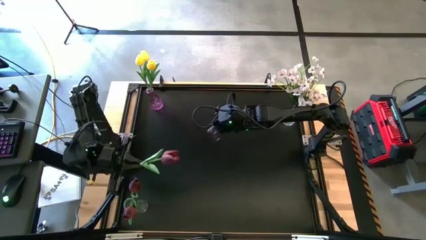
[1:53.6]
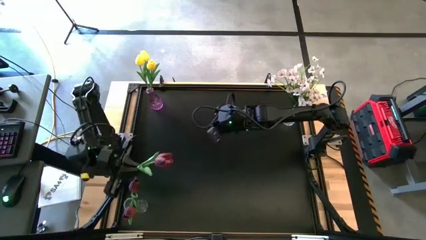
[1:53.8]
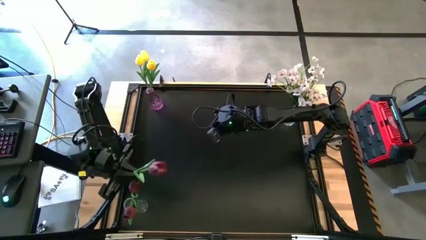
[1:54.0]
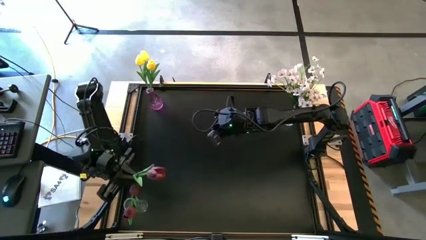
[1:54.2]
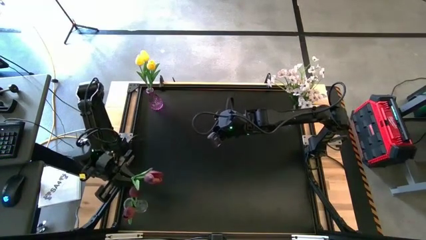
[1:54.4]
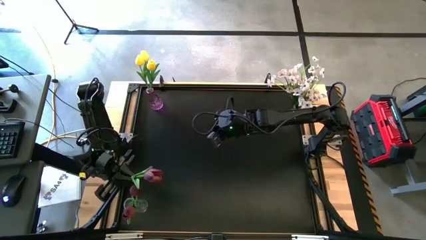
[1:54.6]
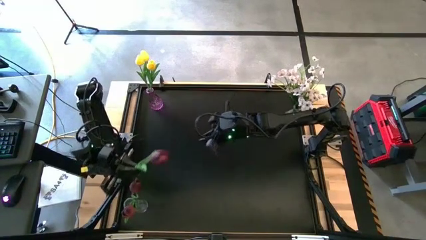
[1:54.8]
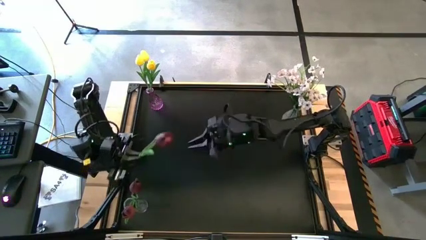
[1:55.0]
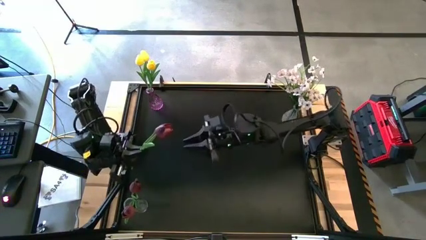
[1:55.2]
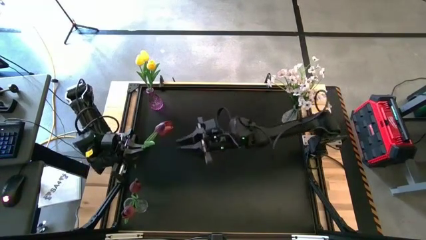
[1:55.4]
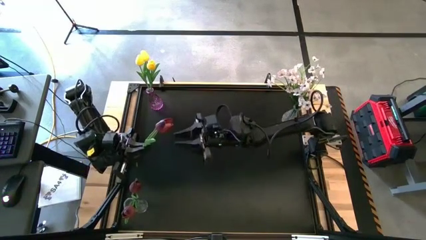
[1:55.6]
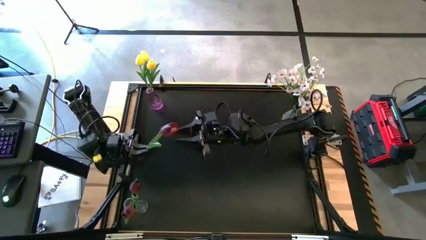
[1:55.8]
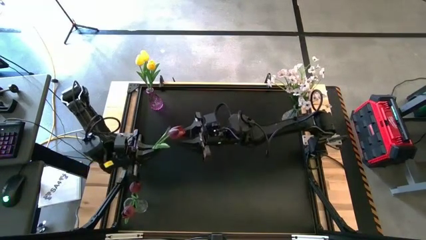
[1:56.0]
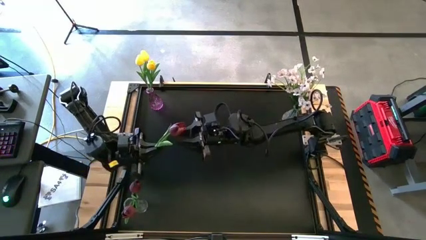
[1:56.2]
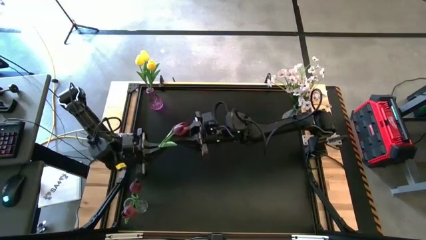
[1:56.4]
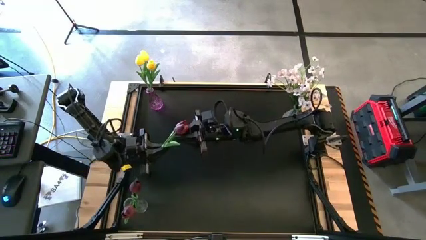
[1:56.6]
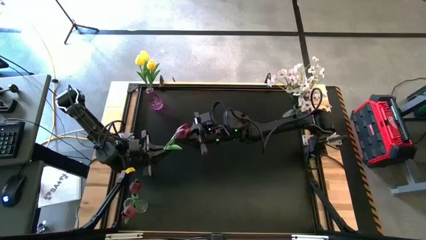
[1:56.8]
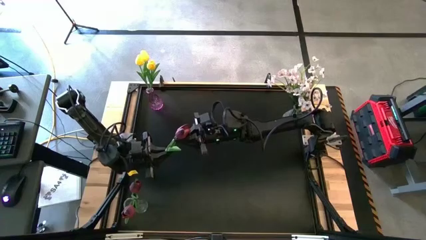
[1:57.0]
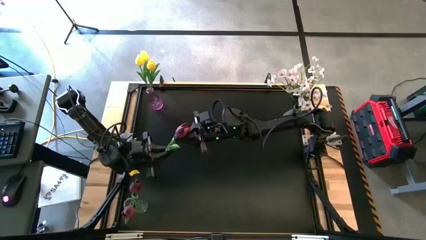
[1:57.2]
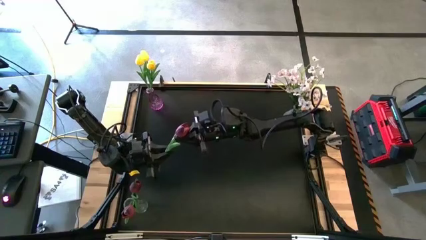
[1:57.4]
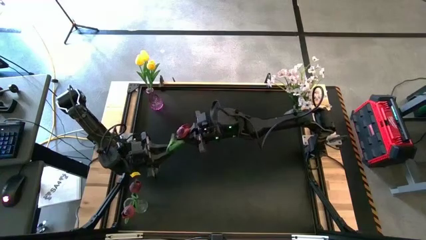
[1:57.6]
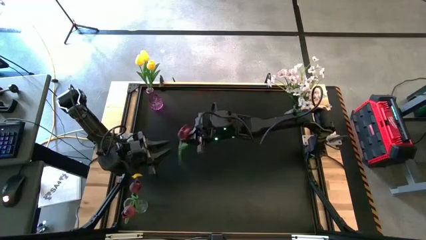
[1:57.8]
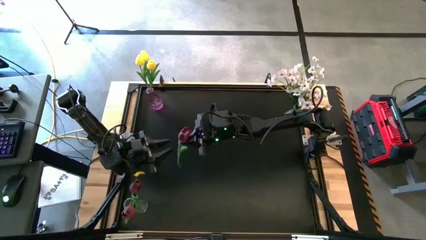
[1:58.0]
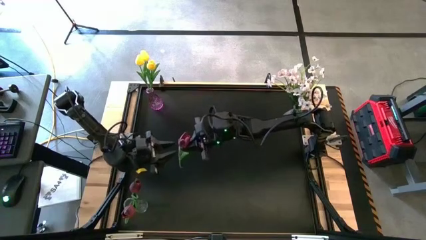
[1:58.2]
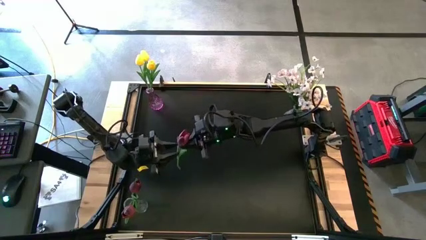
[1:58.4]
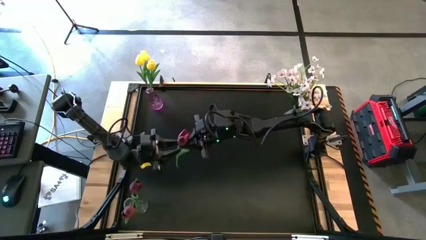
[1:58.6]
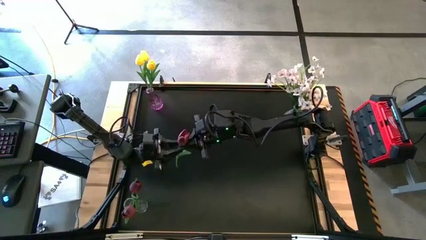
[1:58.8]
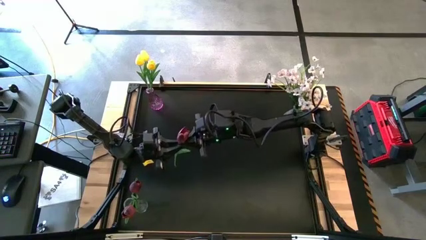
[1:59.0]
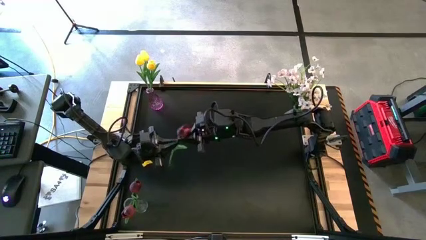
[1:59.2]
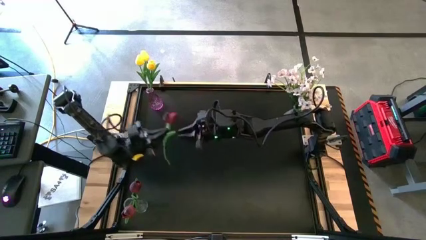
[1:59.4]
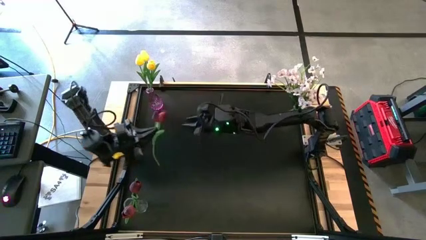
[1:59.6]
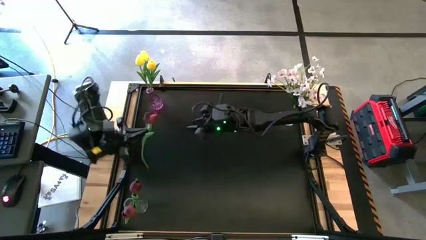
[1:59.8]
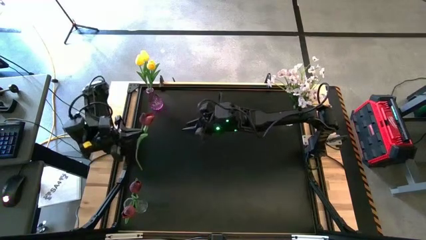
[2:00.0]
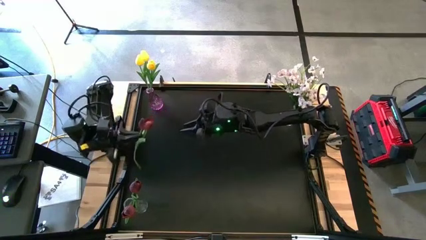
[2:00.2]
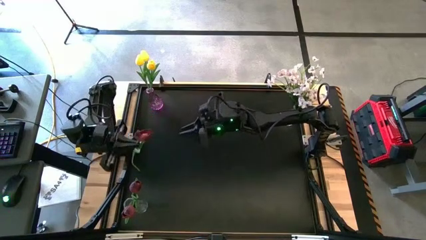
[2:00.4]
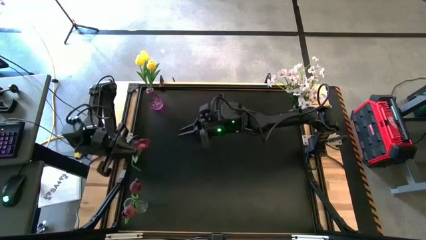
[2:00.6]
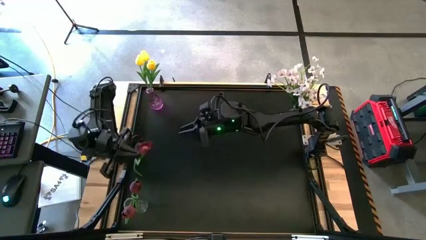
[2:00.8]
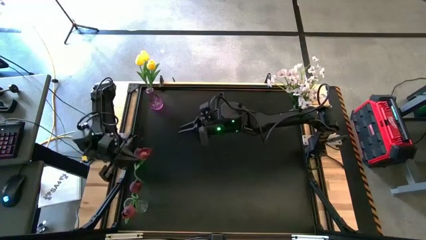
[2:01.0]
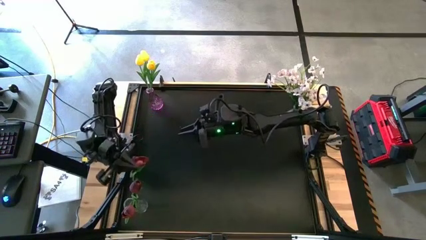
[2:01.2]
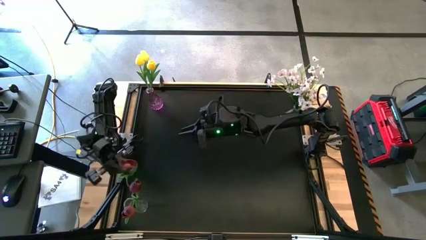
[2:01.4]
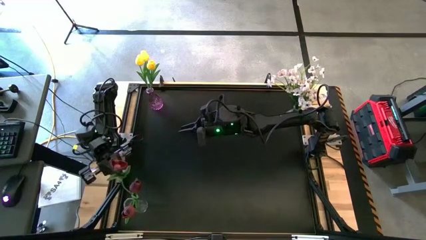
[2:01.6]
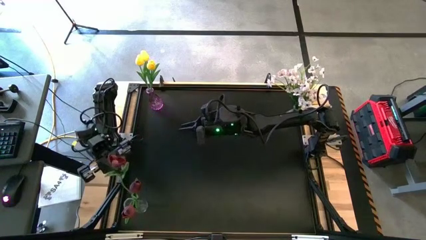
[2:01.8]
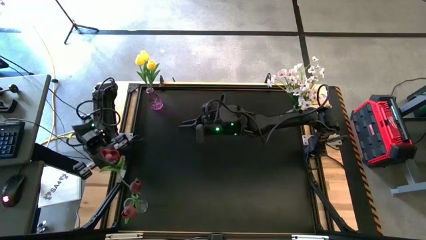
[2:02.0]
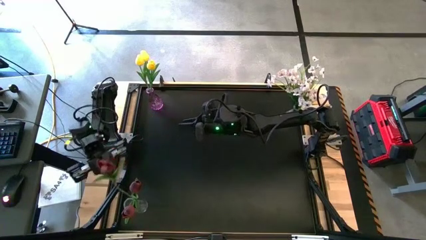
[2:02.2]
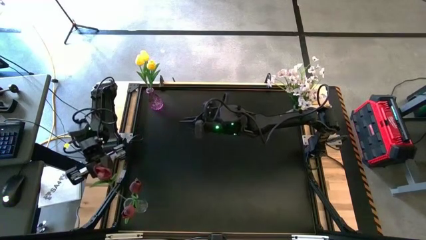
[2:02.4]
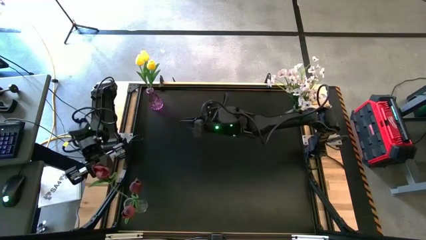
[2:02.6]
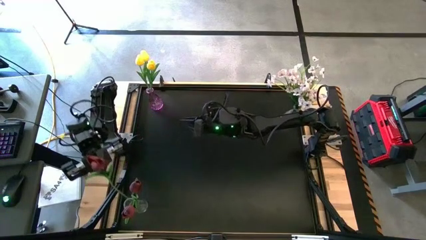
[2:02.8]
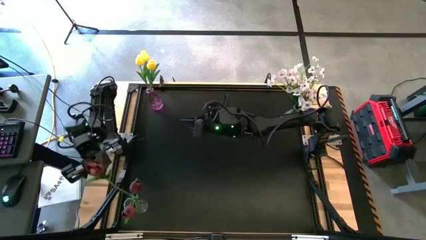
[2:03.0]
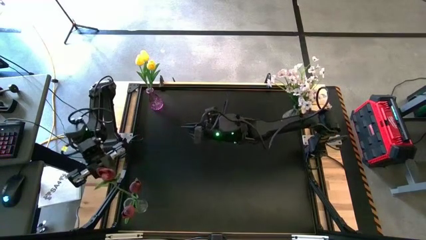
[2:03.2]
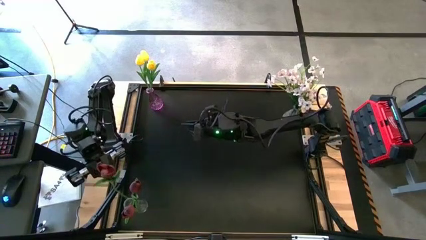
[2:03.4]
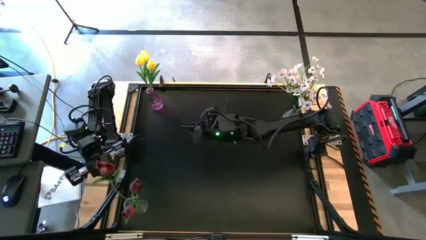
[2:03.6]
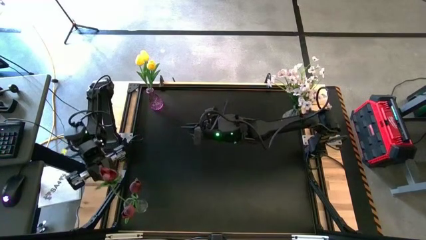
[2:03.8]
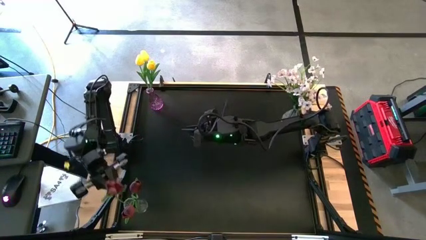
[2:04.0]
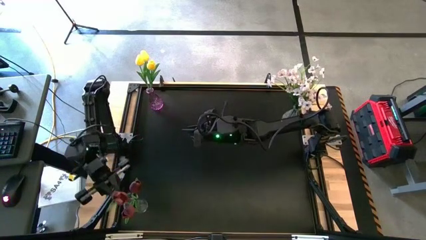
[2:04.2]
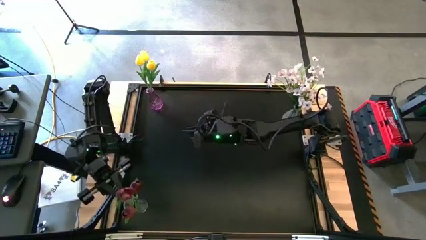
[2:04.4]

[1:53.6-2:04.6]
Task: Sort flowers into vase by color
Put the red flower into the bottom transparent vase

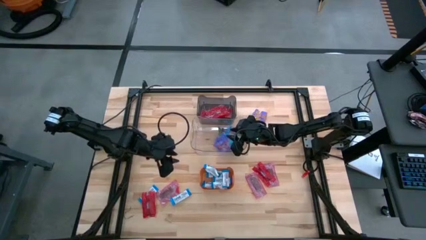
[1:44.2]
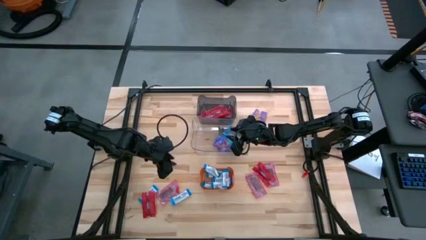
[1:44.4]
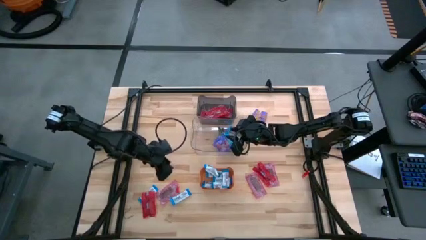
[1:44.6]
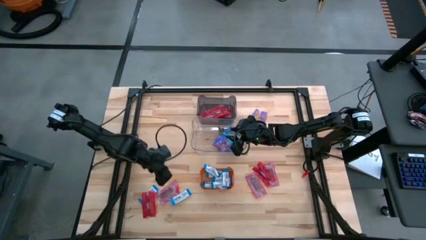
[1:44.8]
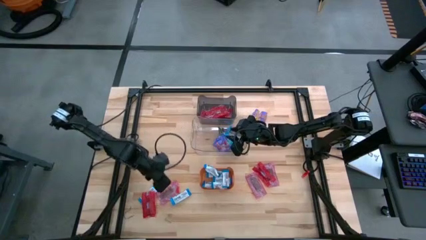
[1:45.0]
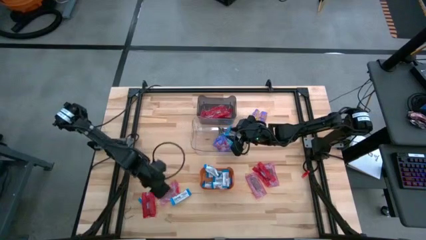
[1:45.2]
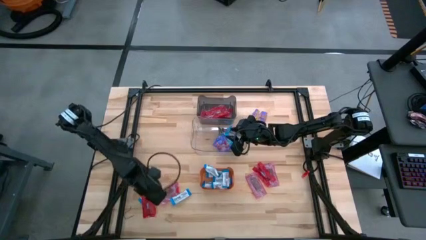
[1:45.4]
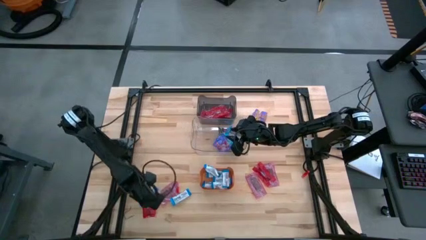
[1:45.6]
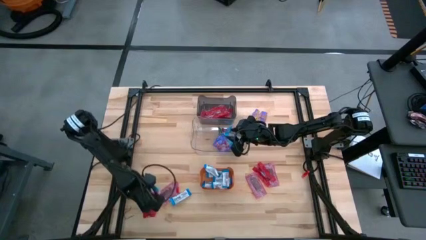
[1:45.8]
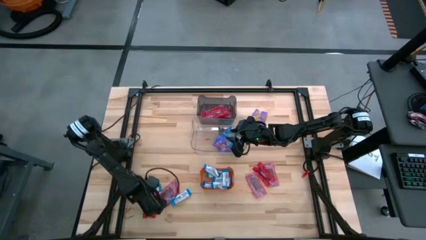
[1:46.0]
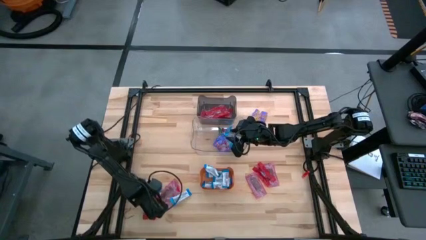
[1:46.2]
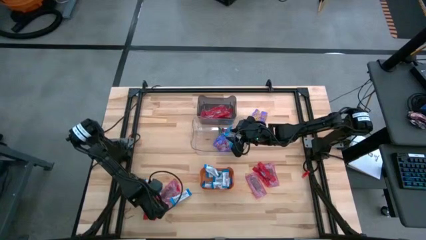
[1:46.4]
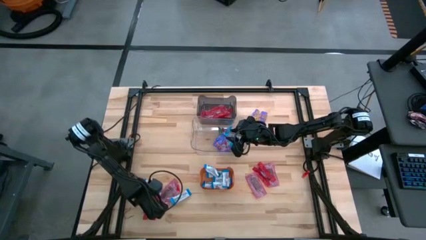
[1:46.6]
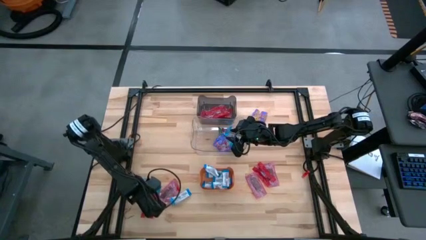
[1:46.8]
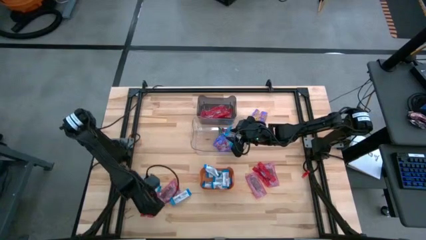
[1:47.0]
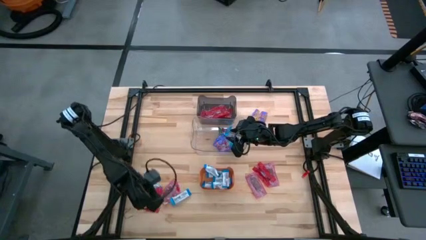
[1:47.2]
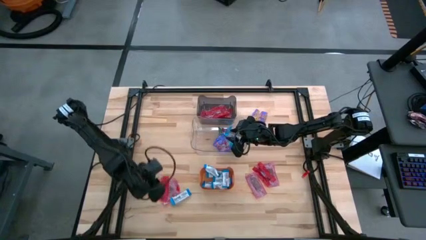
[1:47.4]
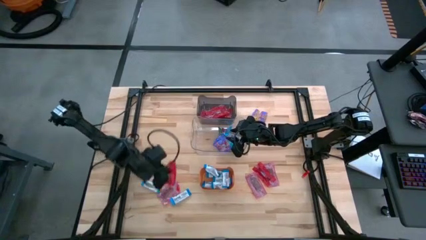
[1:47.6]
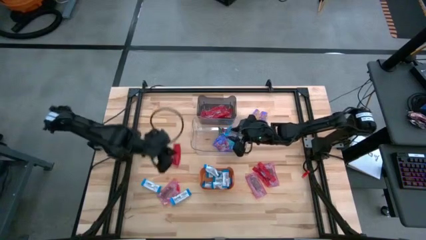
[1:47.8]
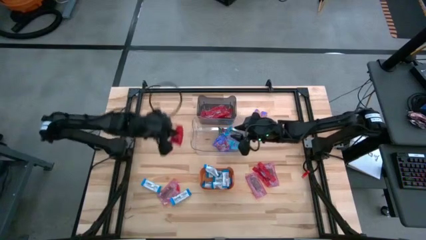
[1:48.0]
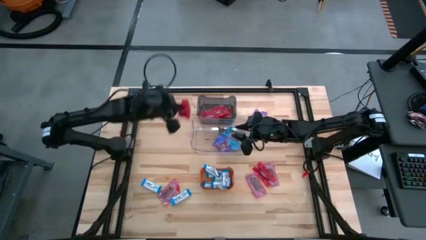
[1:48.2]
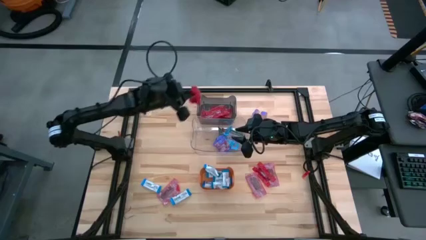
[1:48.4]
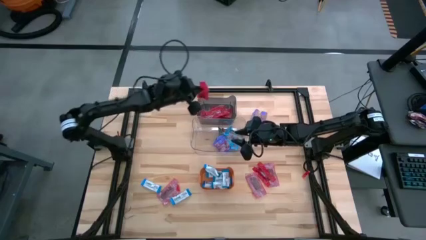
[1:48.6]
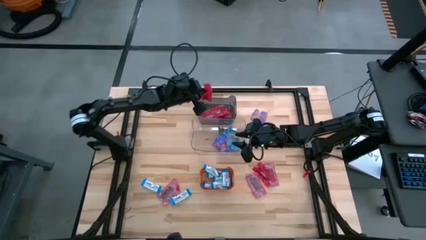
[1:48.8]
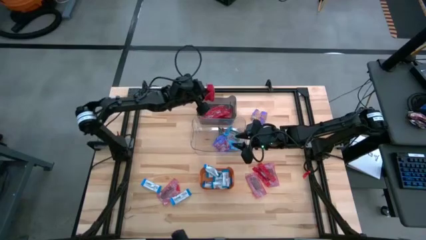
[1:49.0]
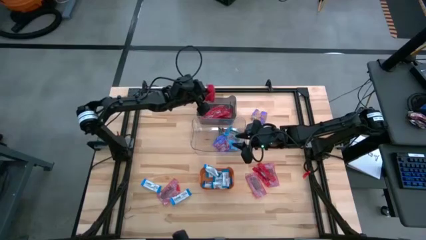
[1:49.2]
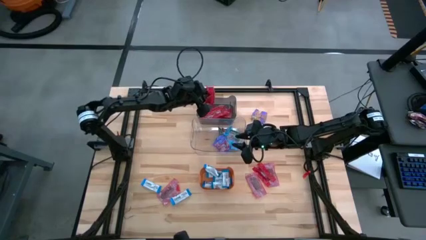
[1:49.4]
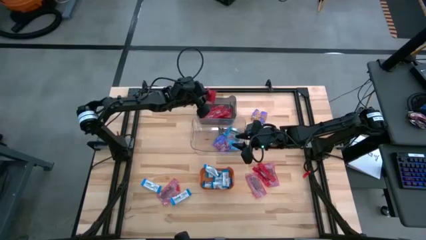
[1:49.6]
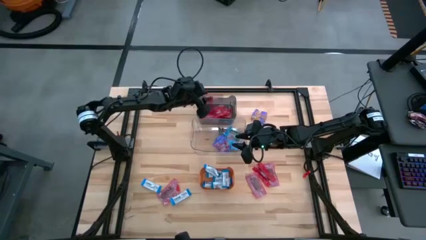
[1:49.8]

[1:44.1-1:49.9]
Task: Sort candy
Put the red candy into the black transparent bin
